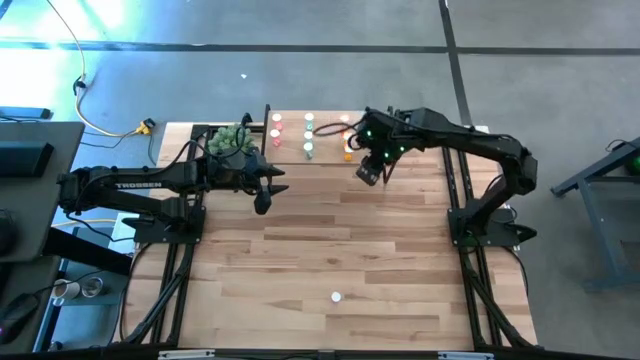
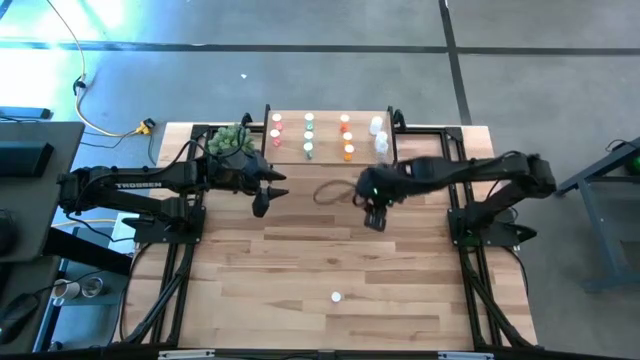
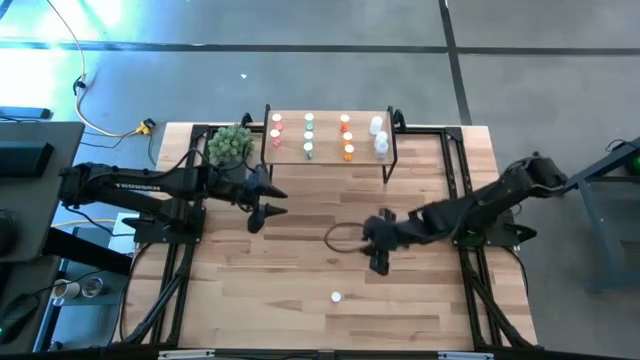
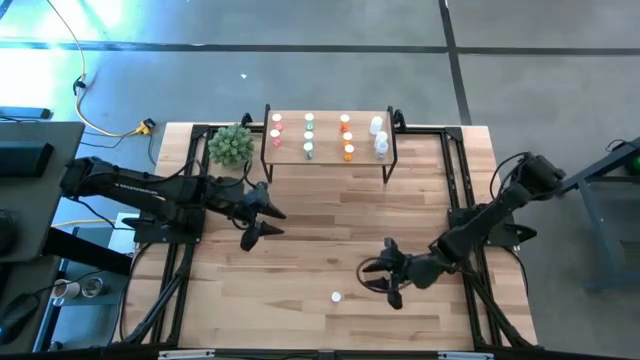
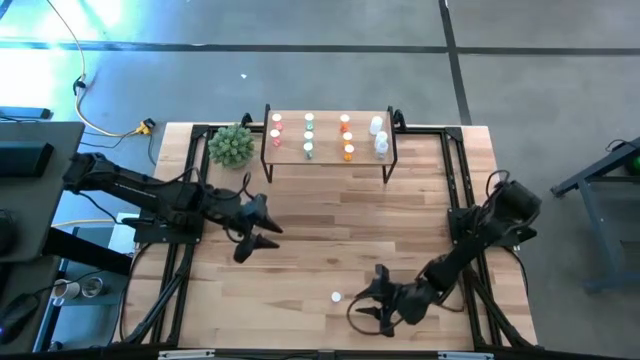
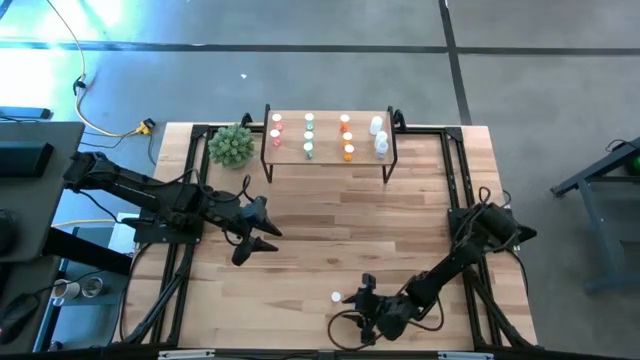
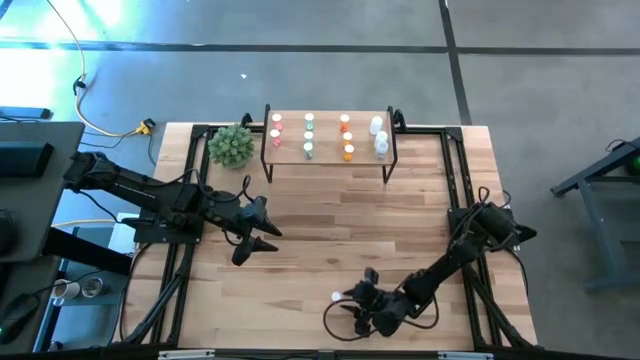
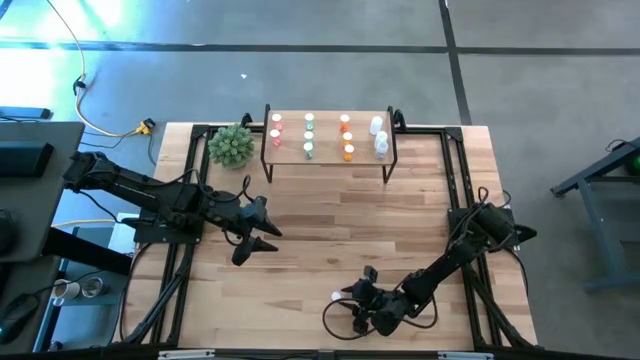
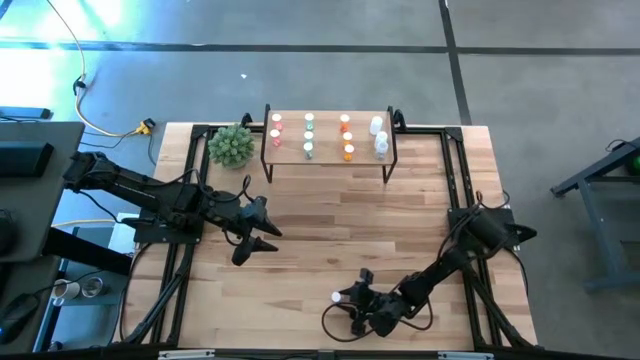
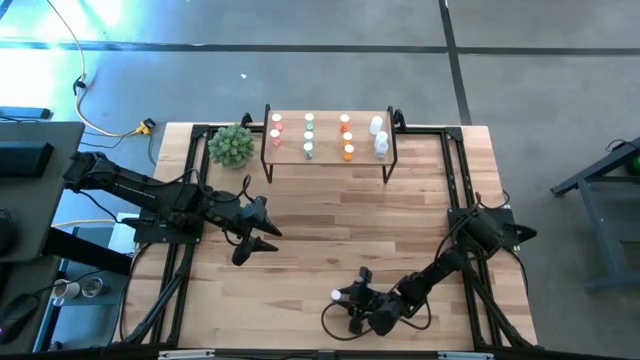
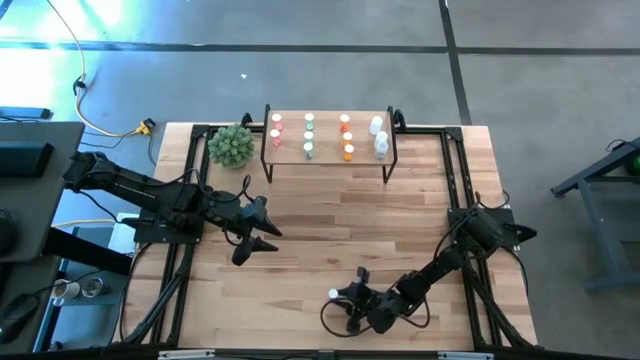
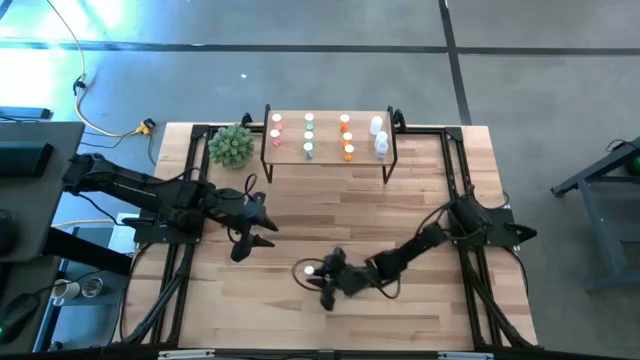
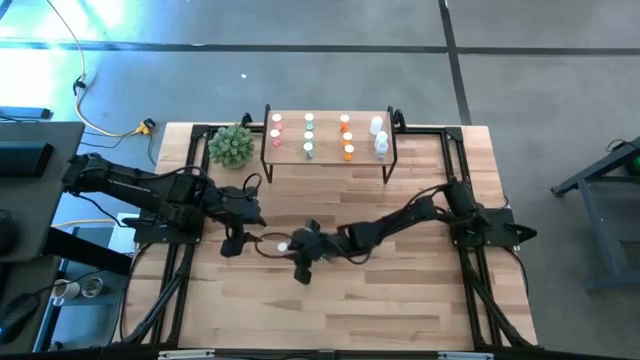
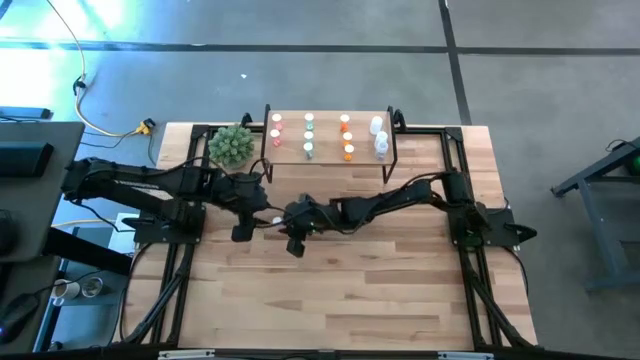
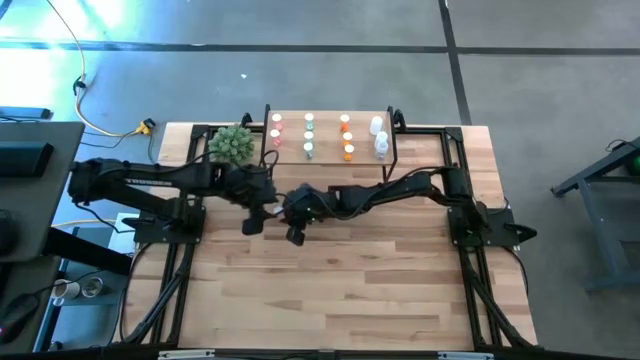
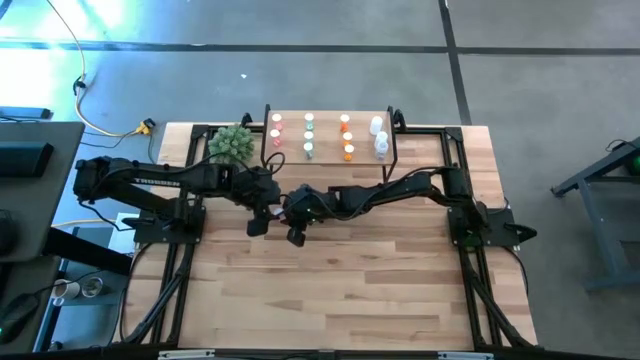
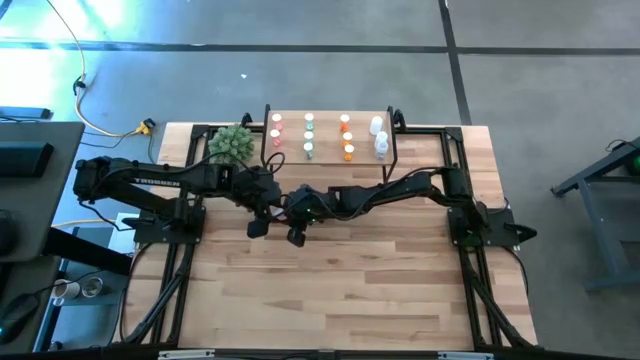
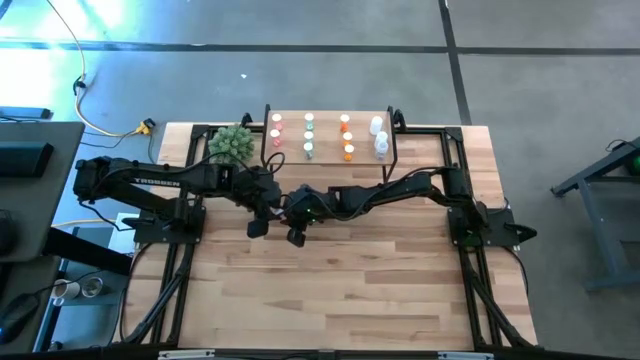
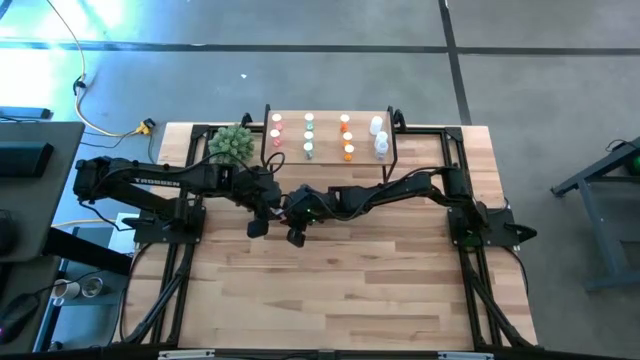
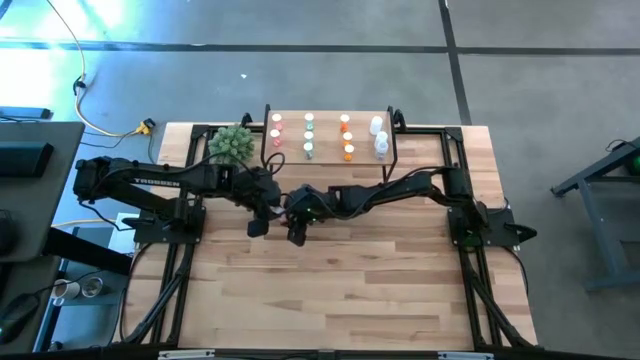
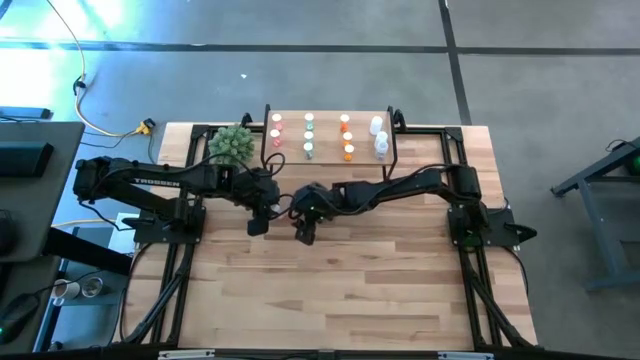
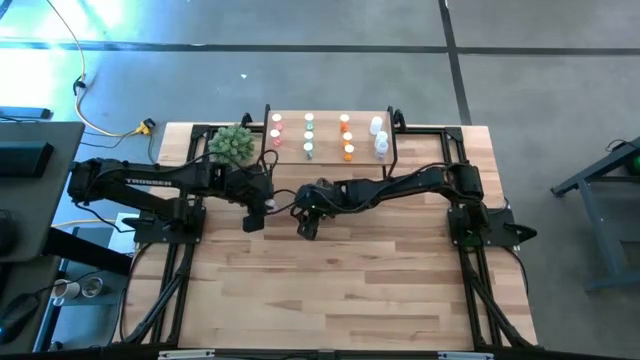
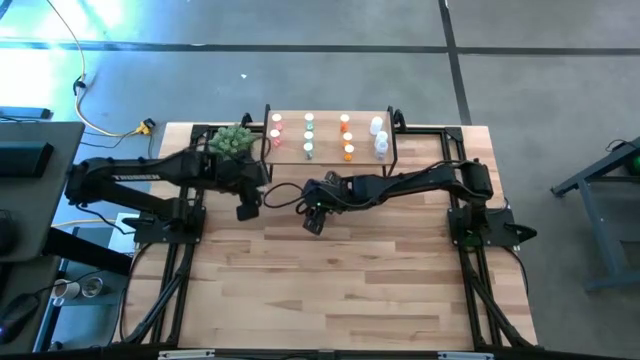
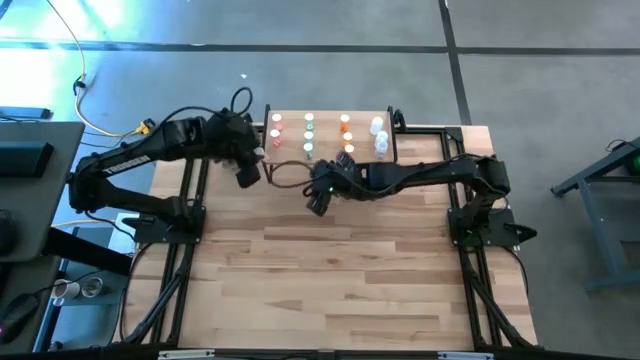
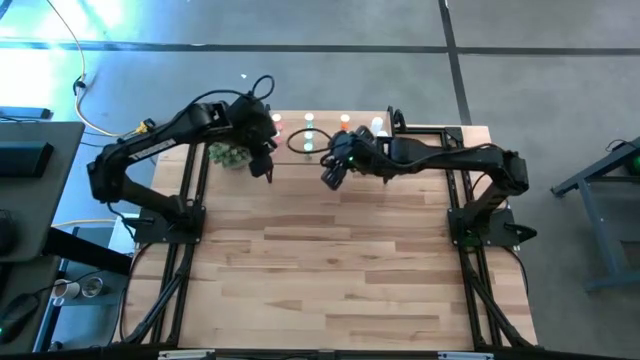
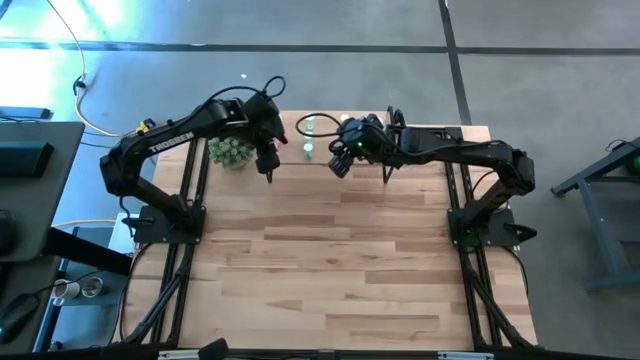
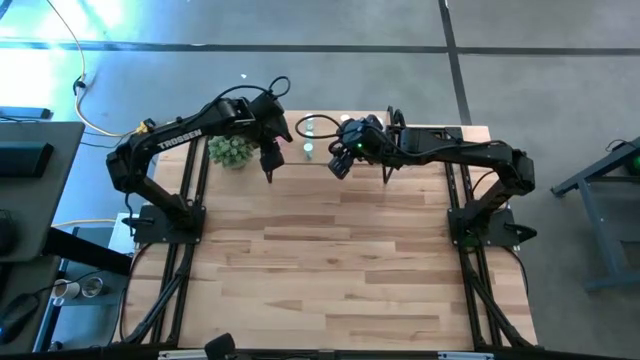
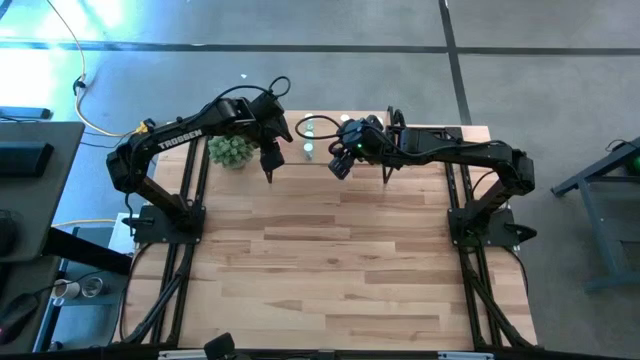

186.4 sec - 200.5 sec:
Task: Pick and place medicine bottles onto shelf by color
Put the pink pill bottle on the shelf aligned with the other pink pill bottles

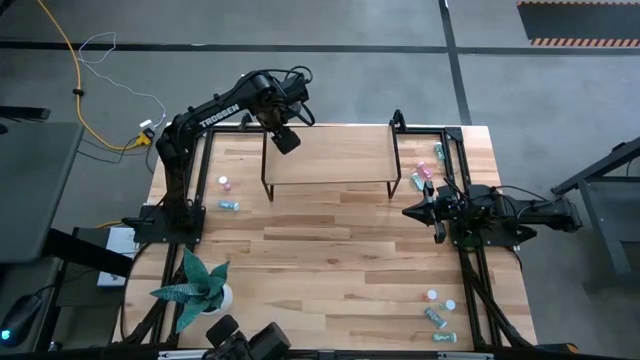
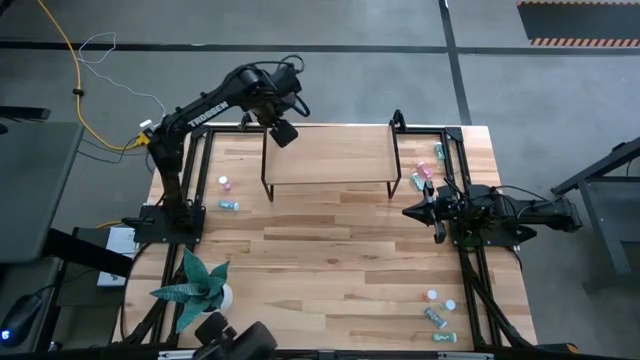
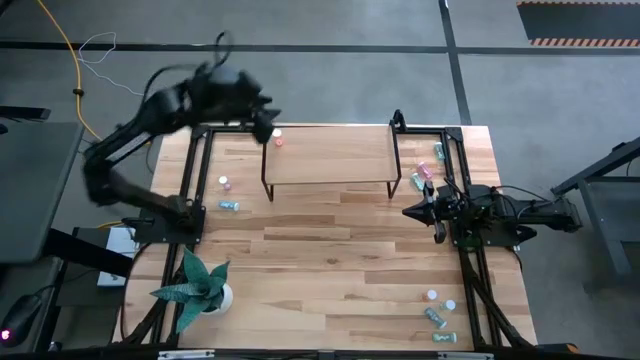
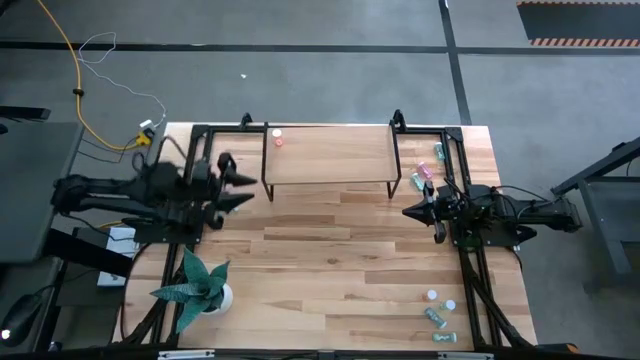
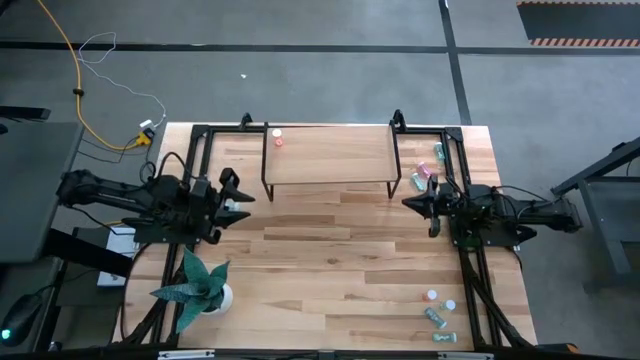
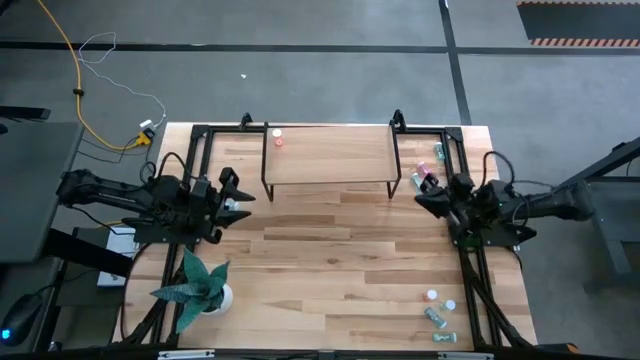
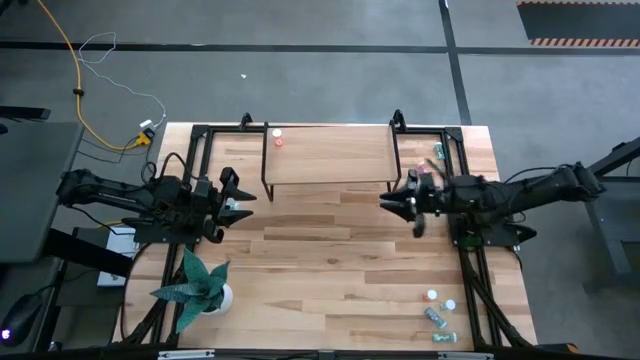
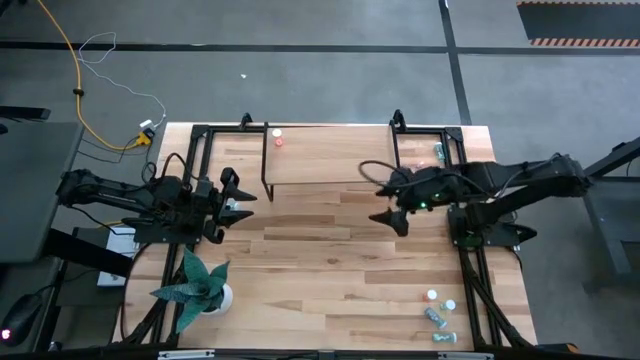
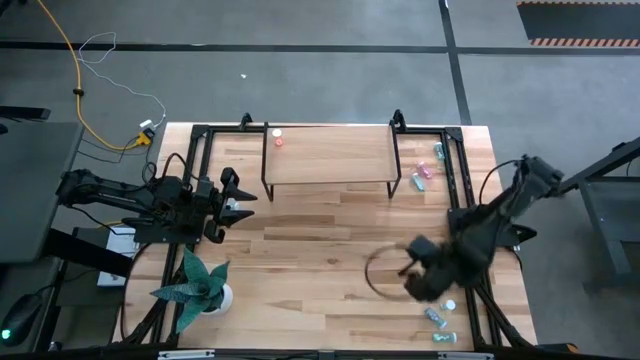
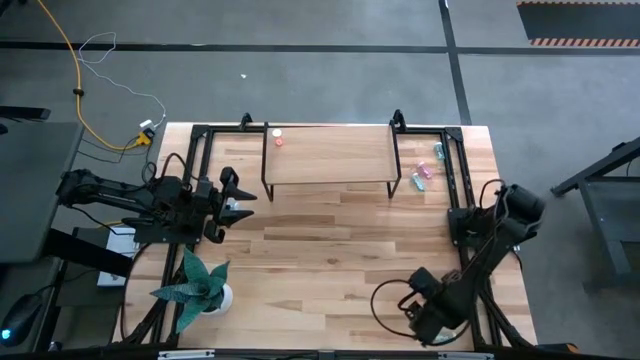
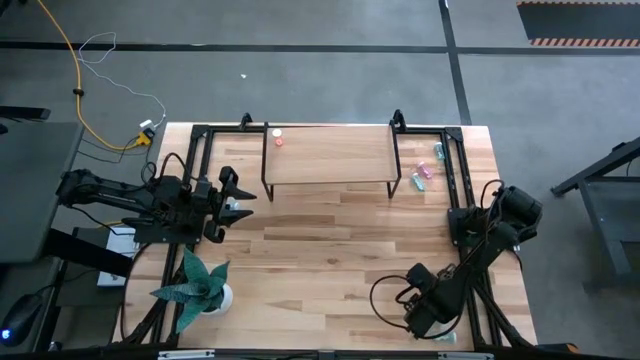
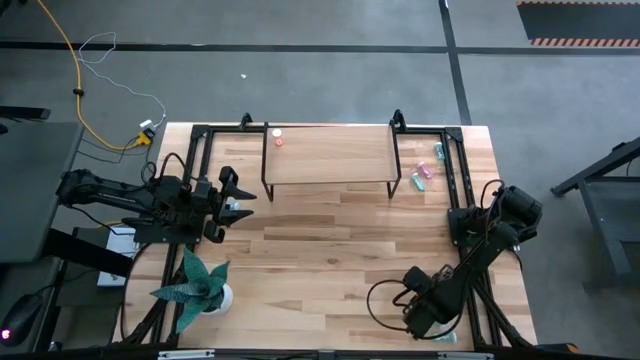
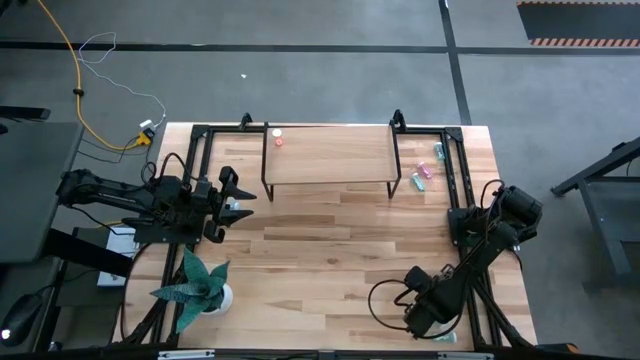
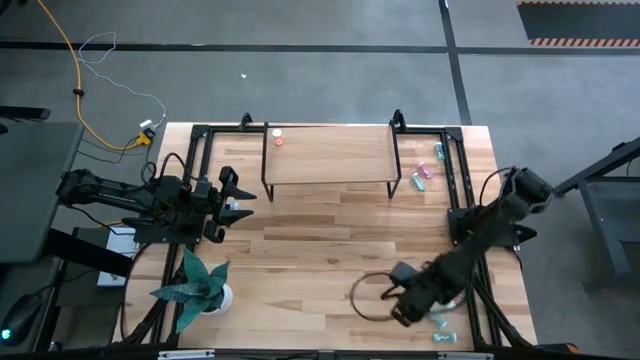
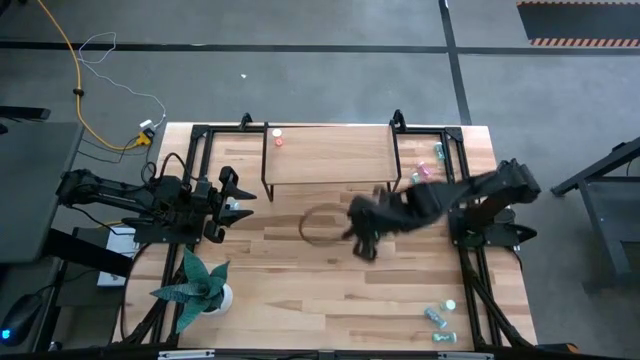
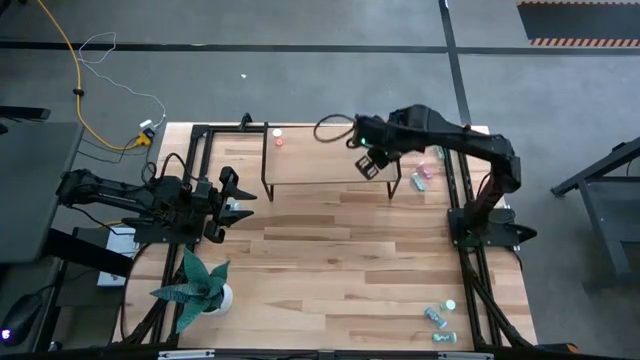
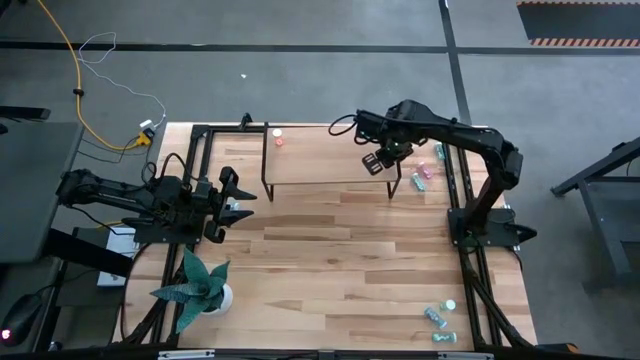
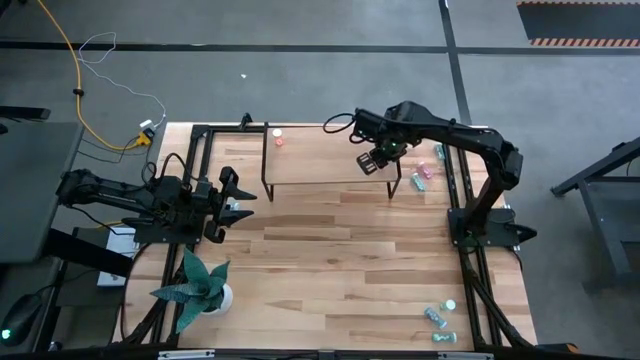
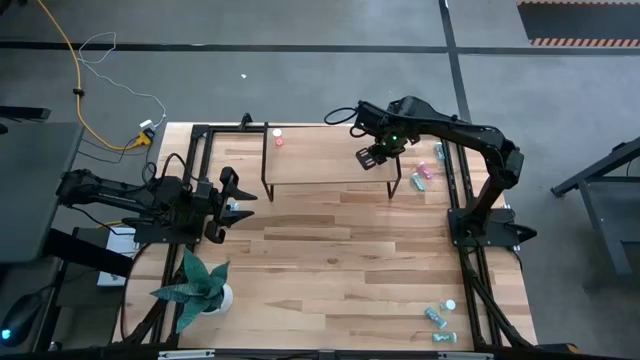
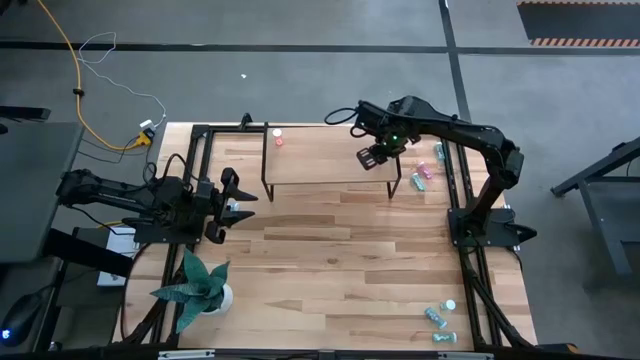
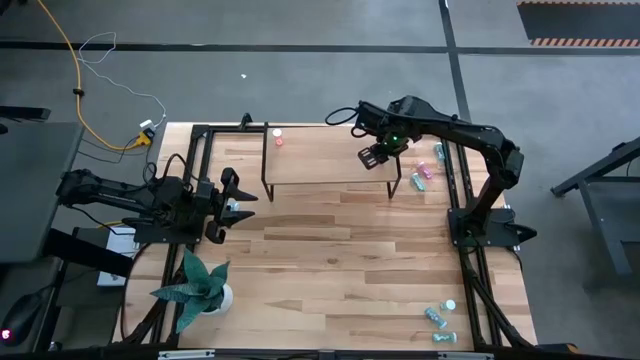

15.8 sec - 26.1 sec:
Task: Pick and place medicine bottles onto shelf by color
Put the red pill bottle on the shelf
